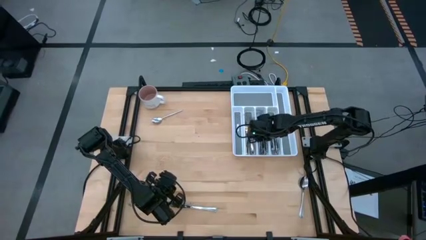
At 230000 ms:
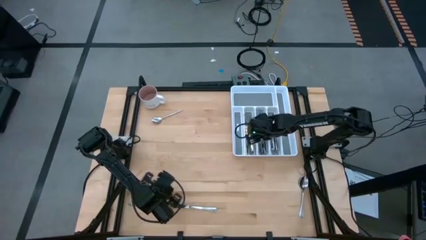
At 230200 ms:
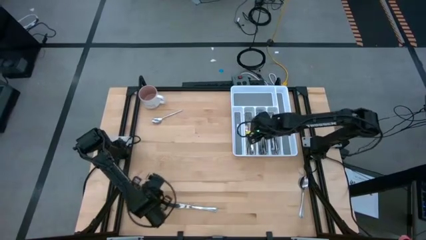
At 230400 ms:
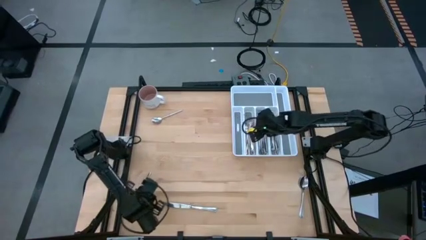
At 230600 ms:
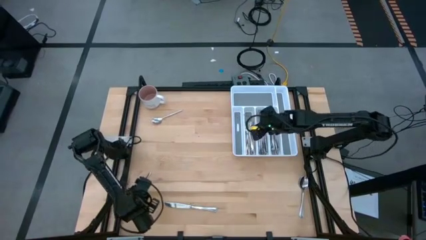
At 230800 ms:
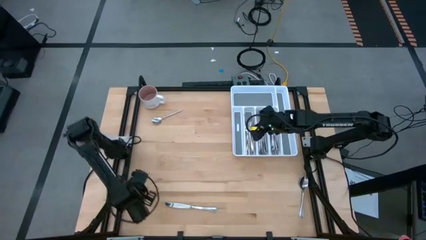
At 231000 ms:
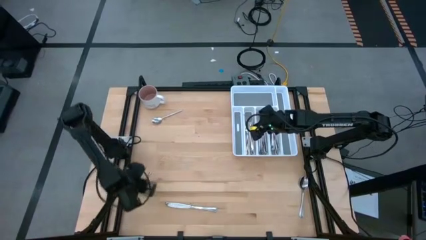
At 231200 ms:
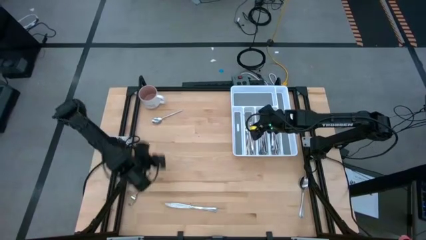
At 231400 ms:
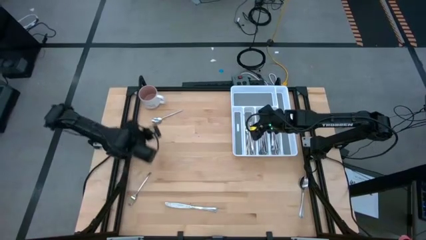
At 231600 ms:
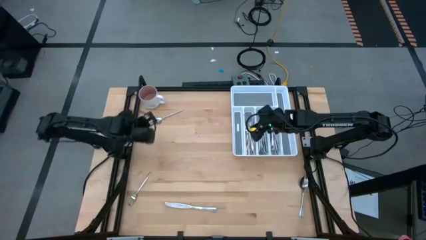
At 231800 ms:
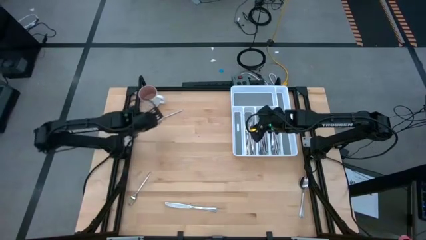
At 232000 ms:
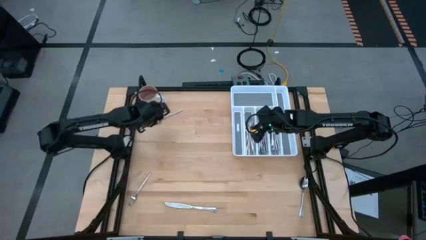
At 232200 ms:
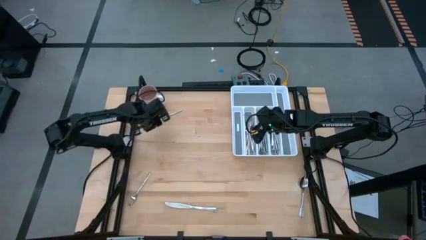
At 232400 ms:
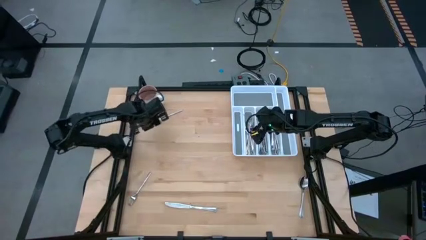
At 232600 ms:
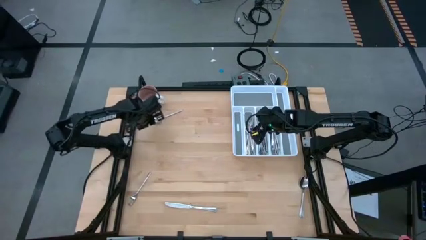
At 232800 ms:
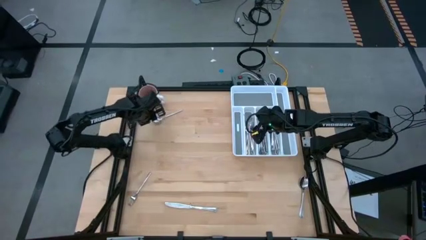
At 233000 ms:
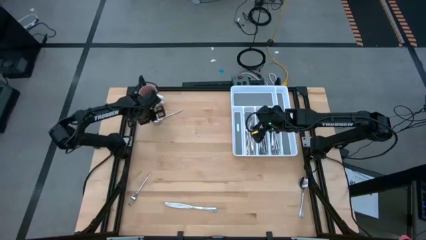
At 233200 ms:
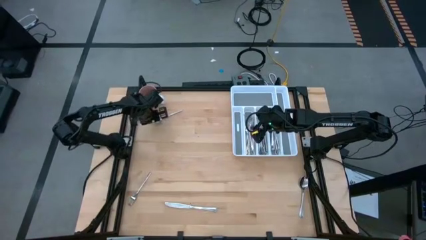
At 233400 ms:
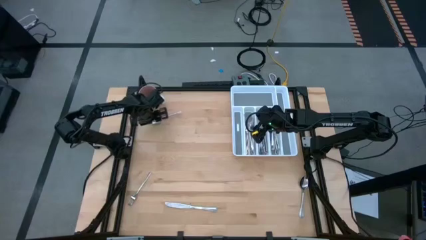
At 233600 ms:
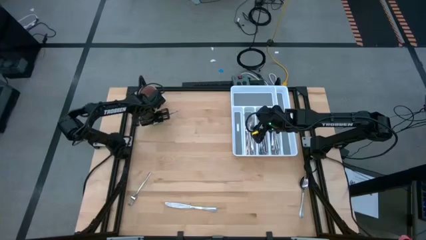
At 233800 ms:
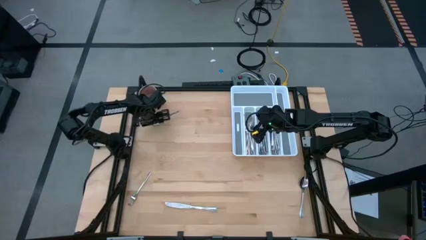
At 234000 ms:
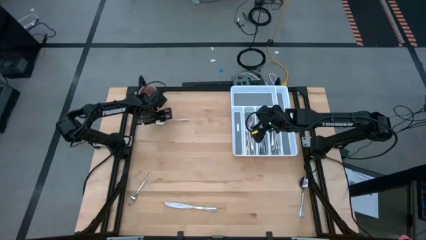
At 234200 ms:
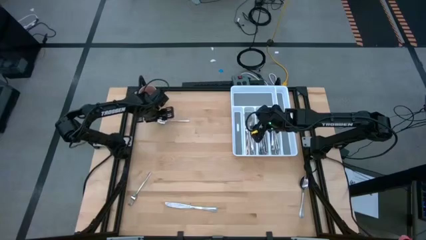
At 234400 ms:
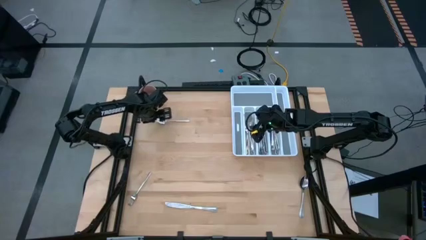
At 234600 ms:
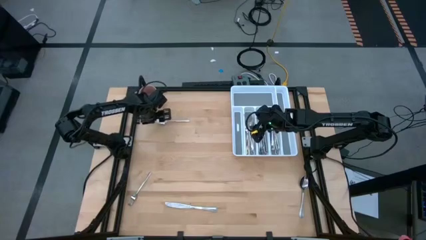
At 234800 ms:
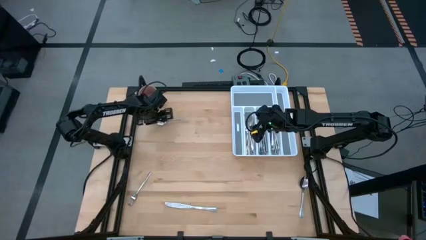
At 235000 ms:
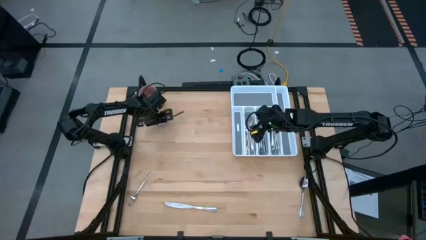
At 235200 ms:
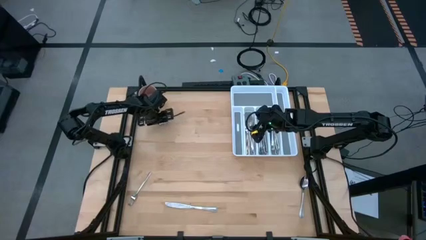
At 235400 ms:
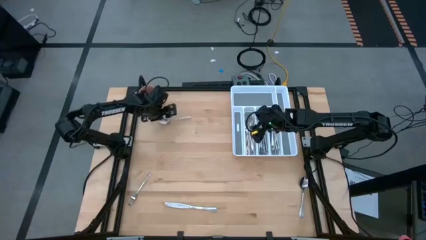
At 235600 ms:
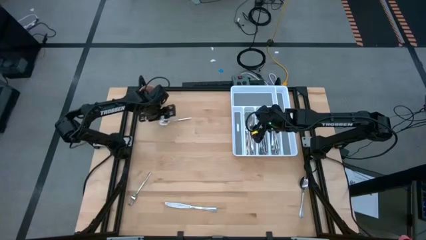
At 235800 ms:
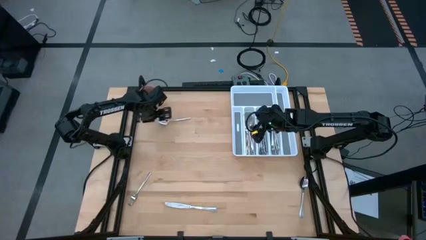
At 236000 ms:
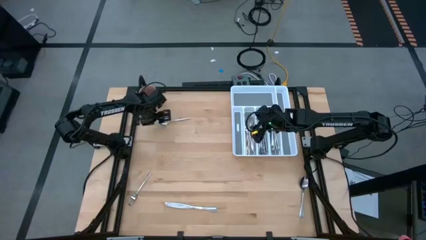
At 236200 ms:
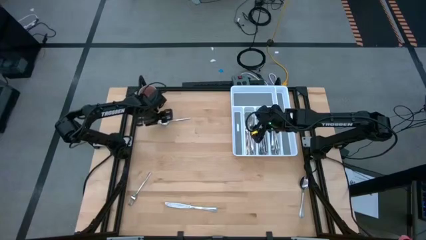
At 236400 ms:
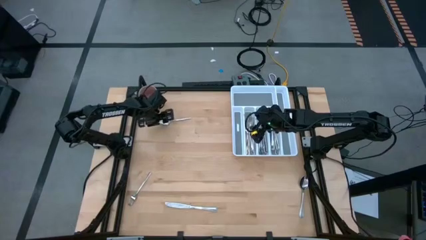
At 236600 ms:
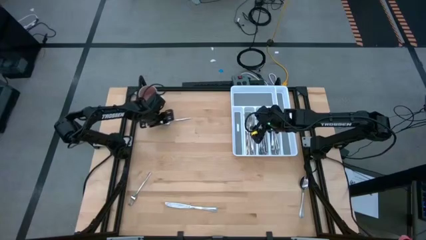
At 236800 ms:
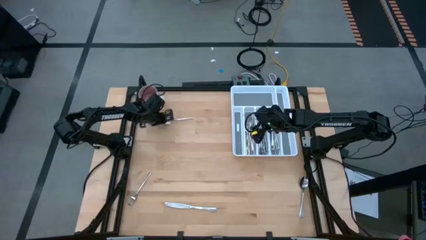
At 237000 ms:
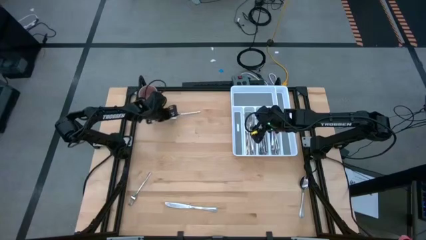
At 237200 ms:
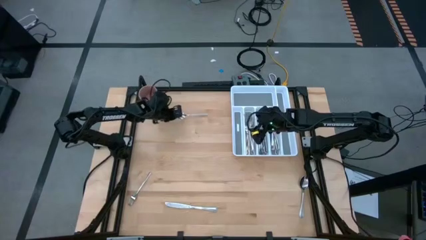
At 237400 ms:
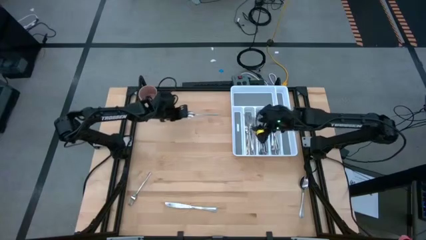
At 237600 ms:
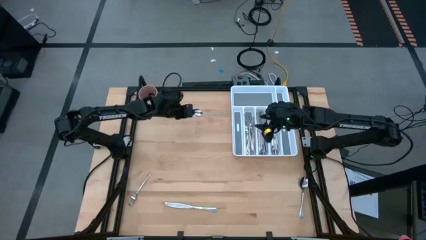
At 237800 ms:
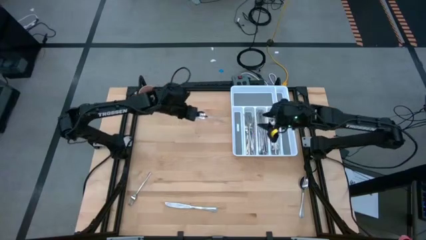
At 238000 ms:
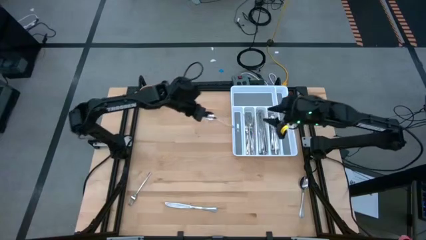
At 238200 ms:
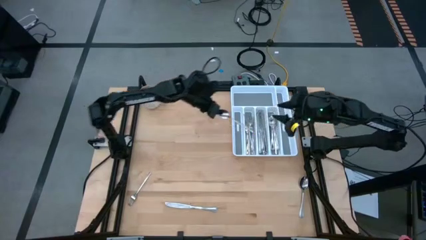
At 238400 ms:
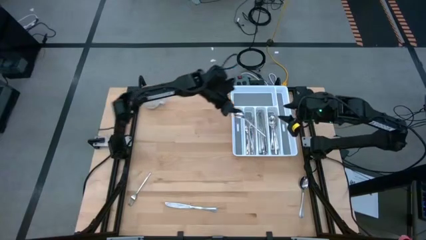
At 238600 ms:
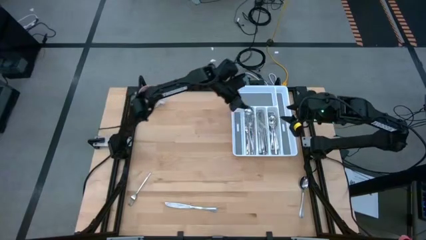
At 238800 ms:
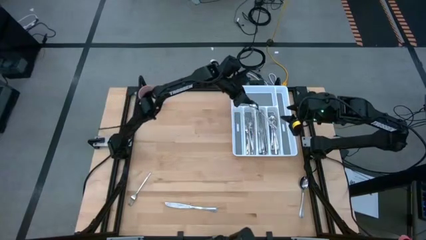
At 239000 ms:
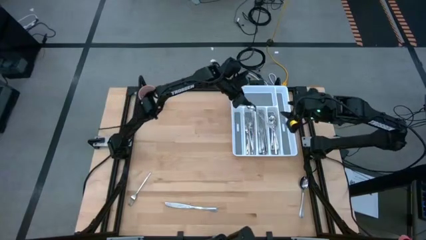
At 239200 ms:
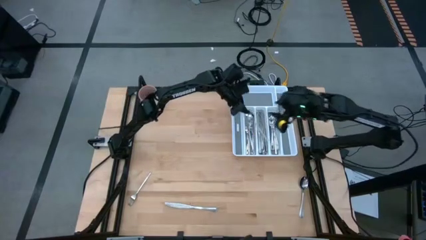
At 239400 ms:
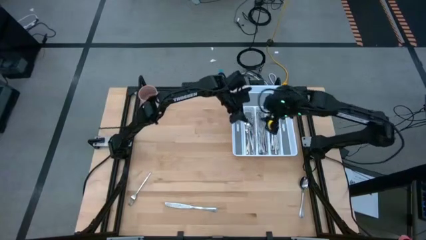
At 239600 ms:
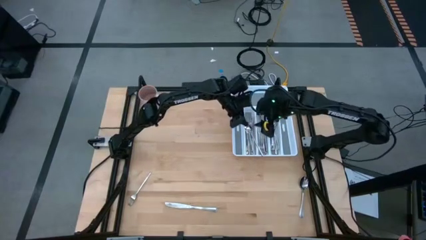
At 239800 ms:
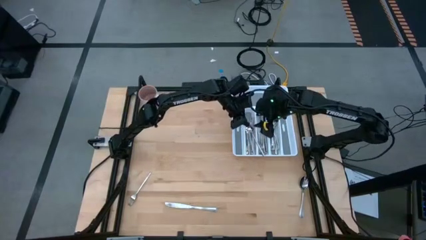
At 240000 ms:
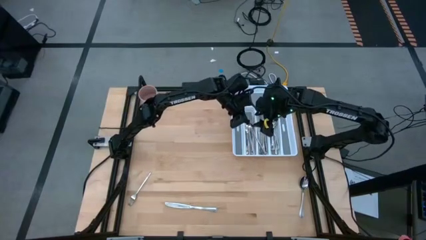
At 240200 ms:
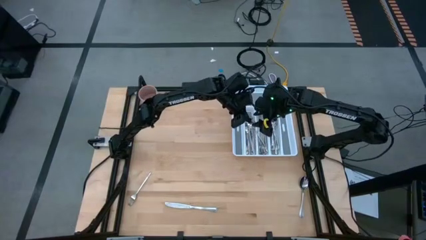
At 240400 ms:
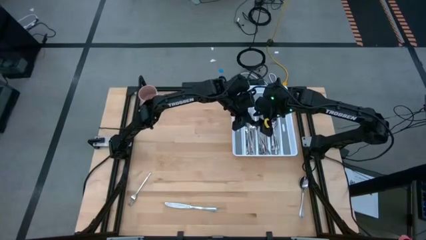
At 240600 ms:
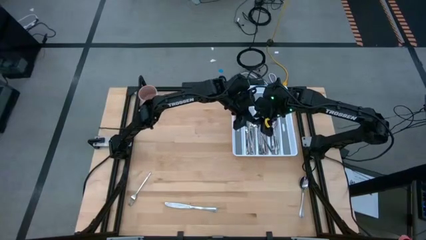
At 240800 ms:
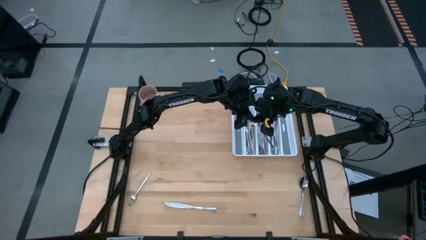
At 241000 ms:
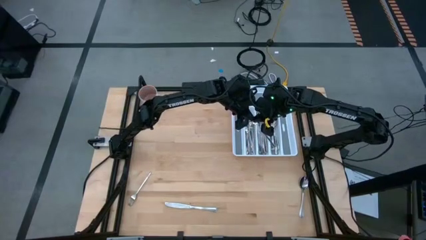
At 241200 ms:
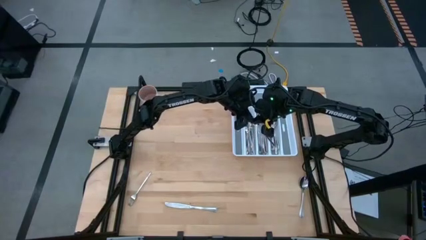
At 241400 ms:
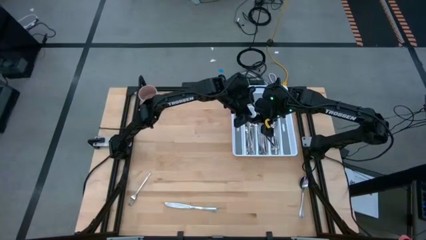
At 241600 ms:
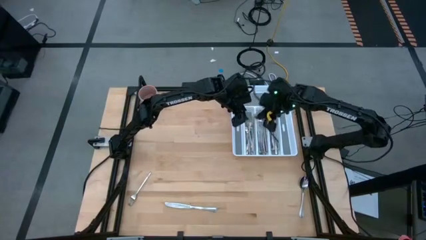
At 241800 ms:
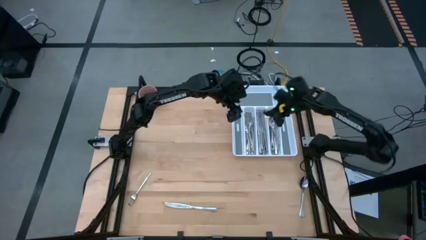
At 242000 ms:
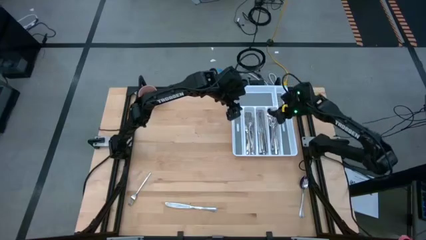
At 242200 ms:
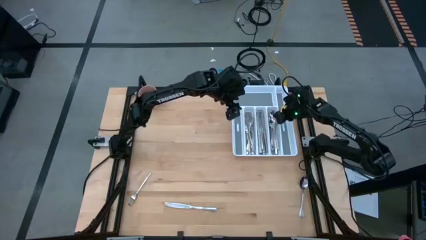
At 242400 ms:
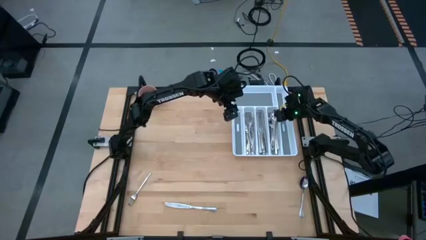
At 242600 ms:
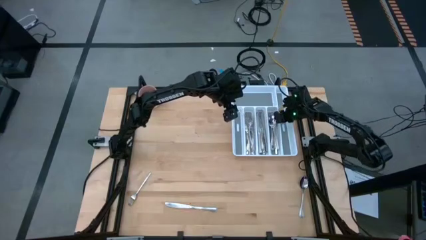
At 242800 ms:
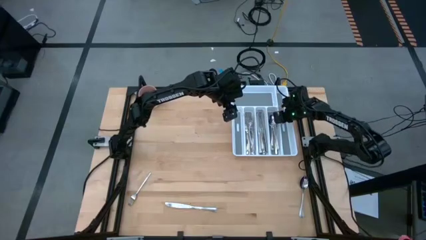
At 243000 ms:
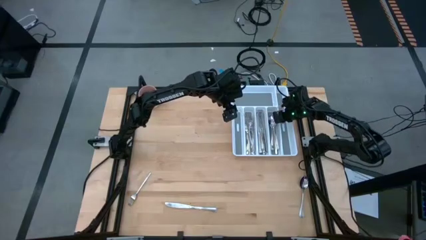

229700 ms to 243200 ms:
Task: Sort silverware
Put the silver spoon into the silverware tray

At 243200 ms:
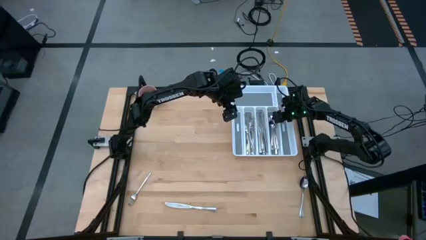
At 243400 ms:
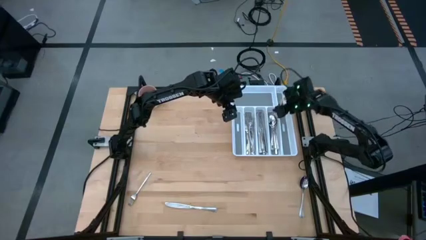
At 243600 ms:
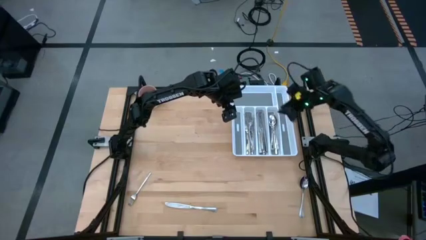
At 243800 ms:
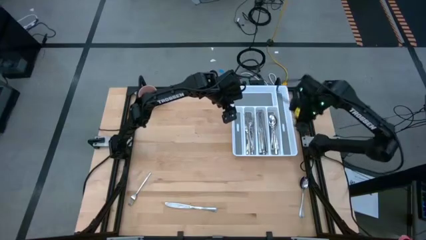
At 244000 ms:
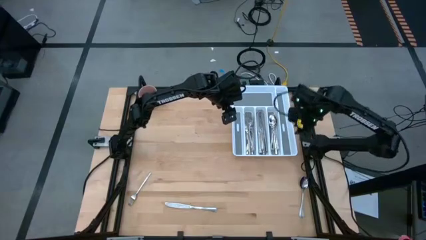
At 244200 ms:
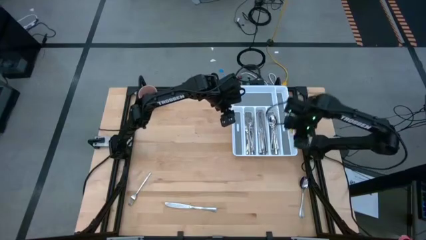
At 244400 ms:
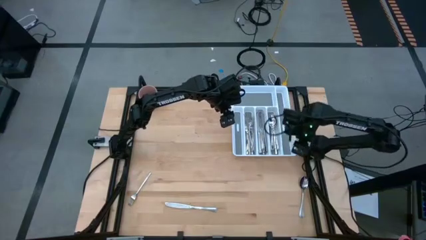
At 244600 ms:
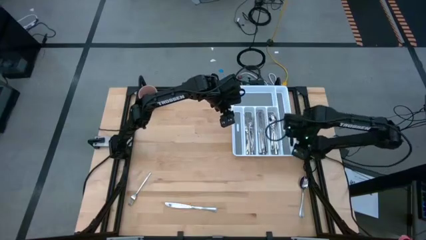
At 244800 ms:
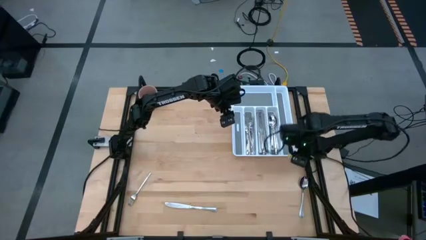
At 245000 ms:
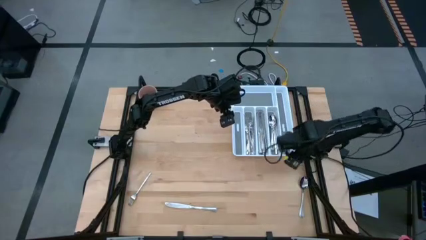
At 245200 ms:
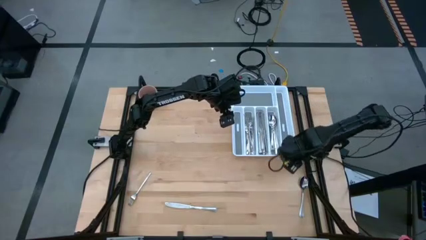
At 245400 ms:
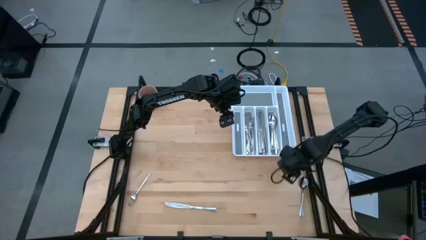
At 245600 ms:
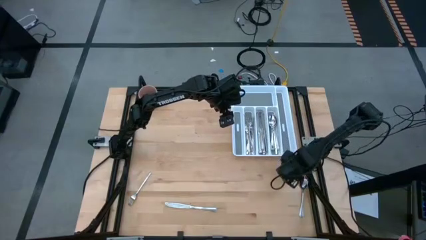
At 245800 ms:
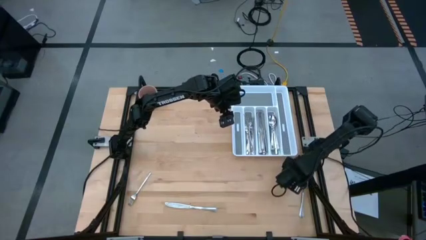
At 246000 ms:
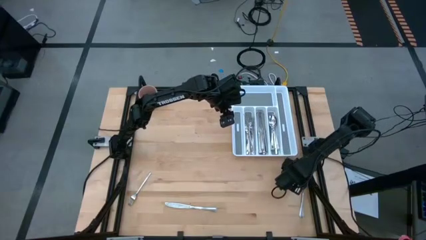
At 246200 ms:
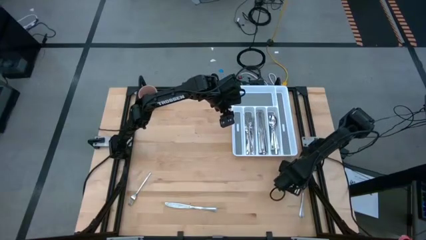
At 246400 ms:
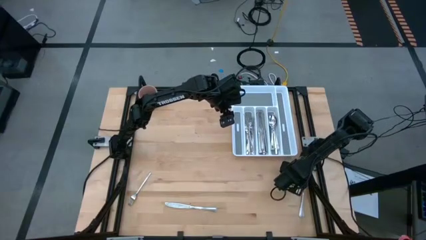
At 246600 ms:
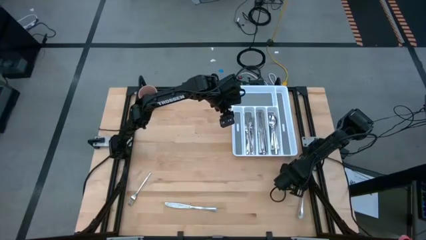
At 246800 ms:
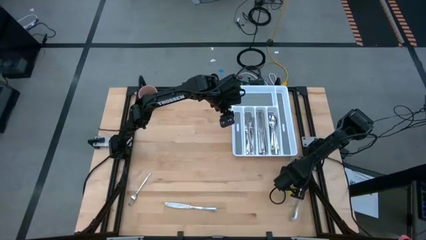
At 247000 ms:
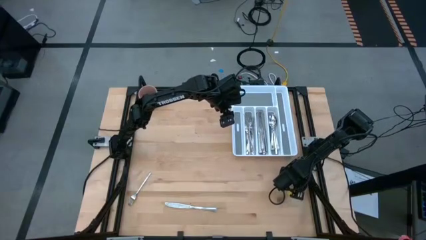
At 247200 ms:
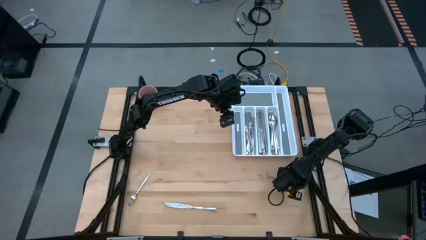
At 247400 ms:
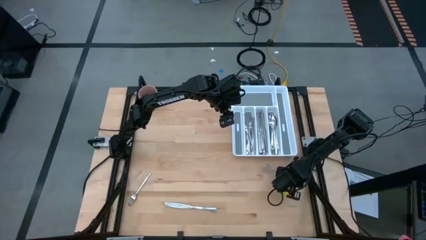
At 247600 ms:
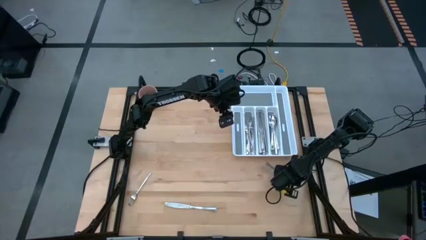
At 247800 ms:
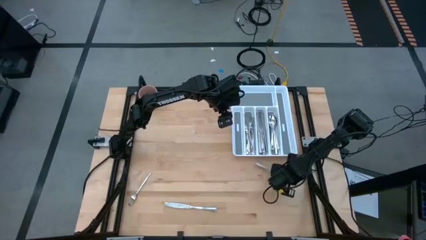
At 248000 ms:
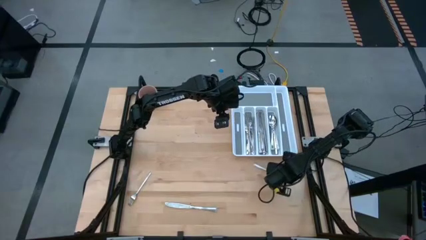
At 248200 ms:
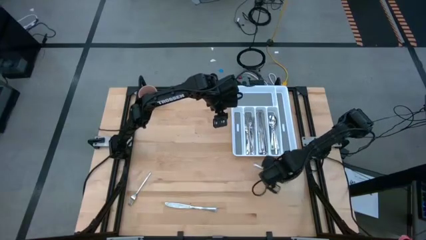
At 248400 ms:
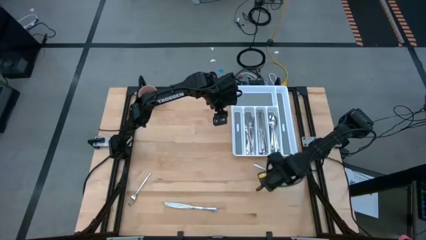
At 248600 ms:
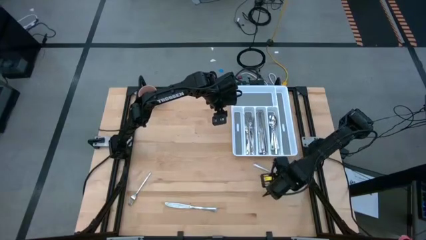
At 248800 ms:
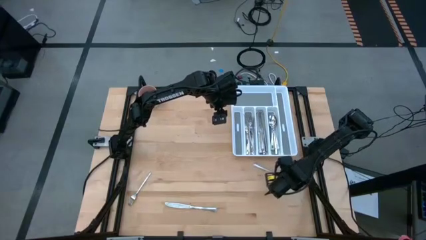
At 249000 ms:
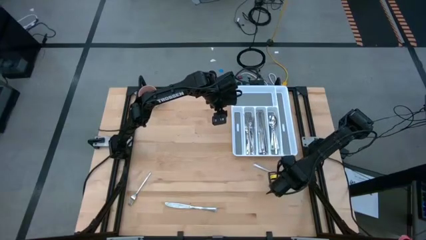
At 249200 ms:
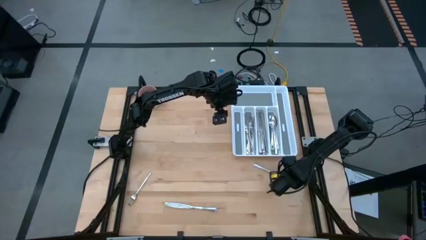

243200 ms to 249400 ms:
Put the silver spoon into the silverware tray
